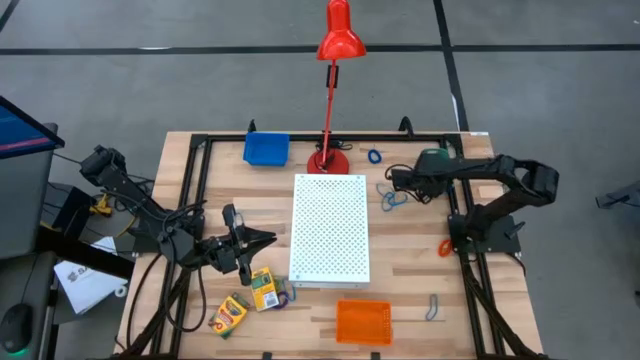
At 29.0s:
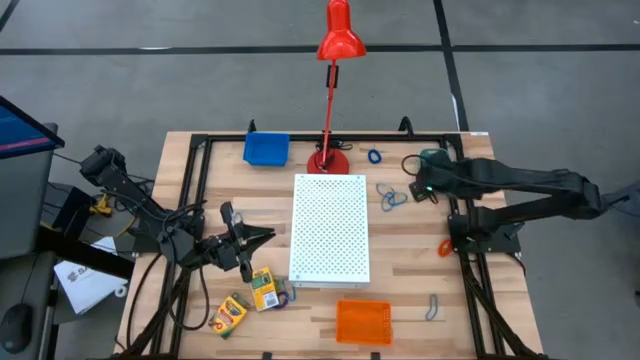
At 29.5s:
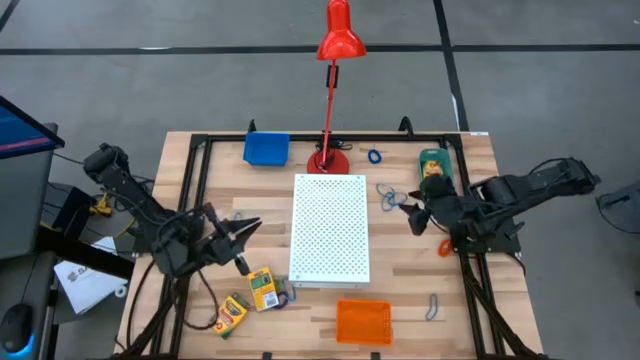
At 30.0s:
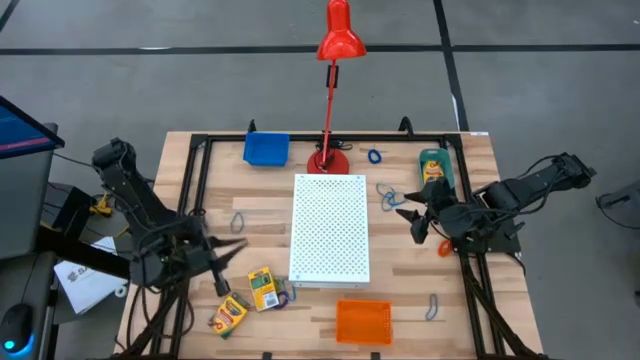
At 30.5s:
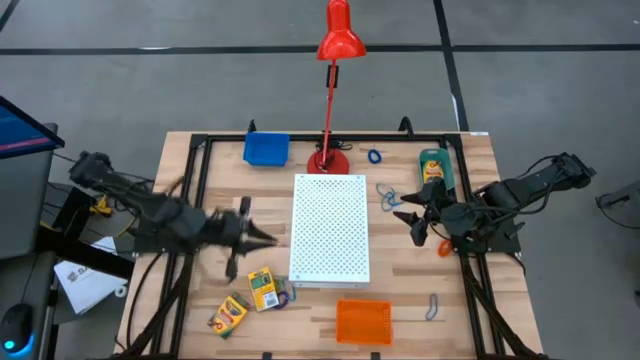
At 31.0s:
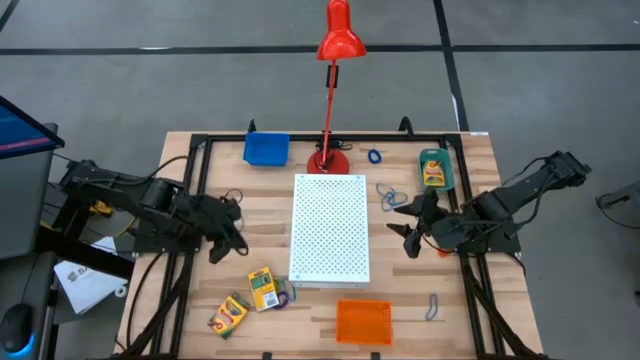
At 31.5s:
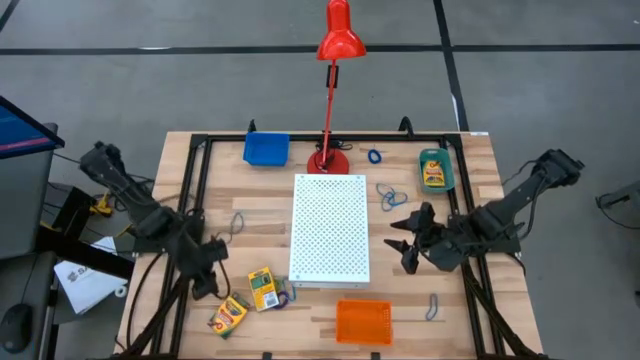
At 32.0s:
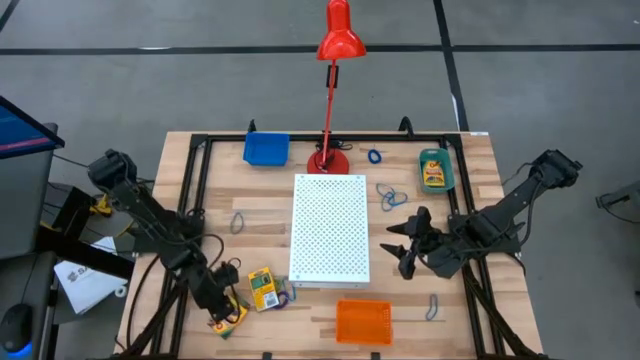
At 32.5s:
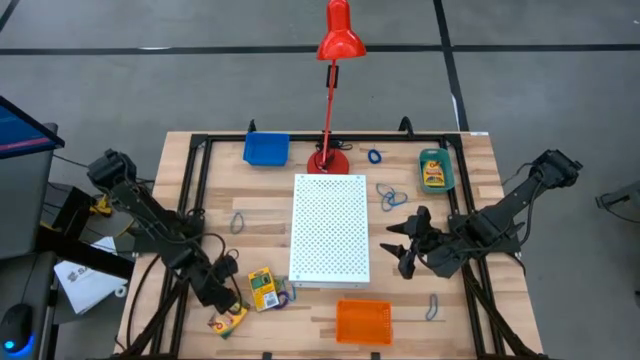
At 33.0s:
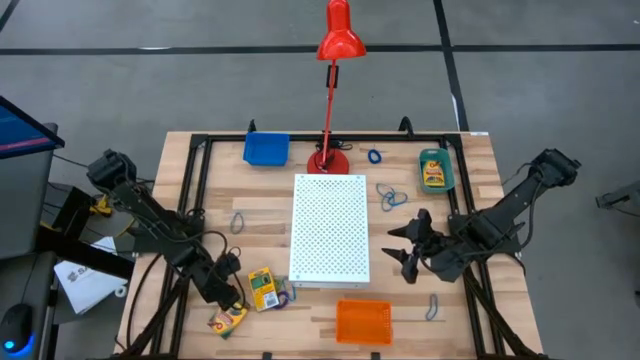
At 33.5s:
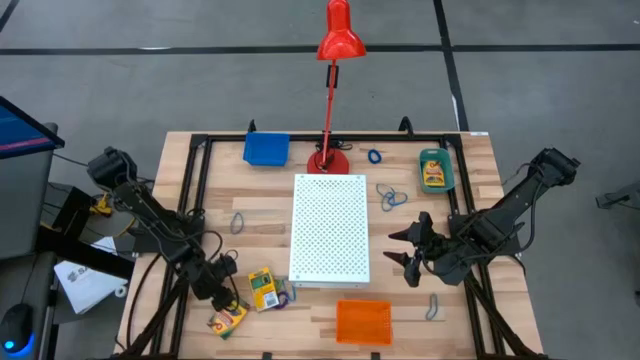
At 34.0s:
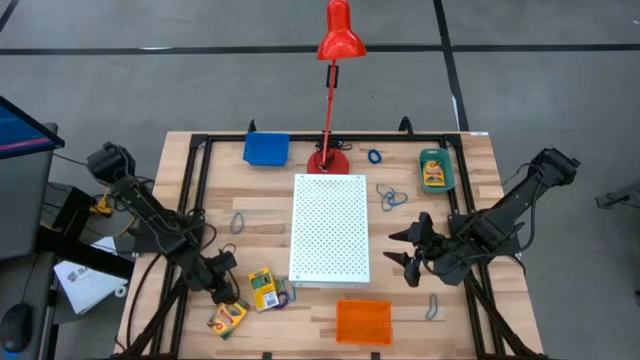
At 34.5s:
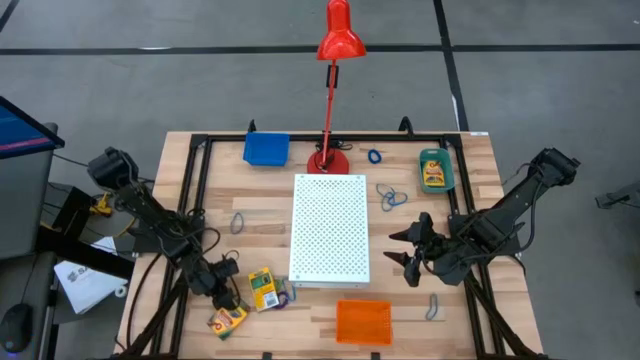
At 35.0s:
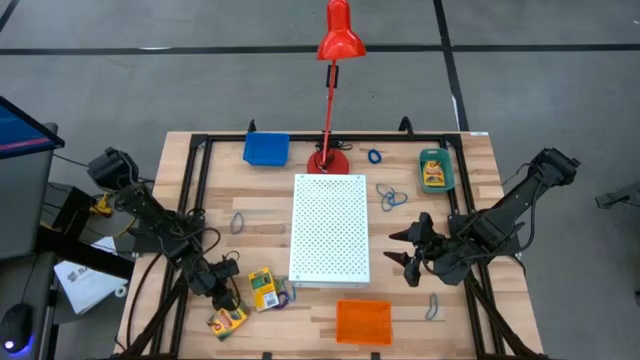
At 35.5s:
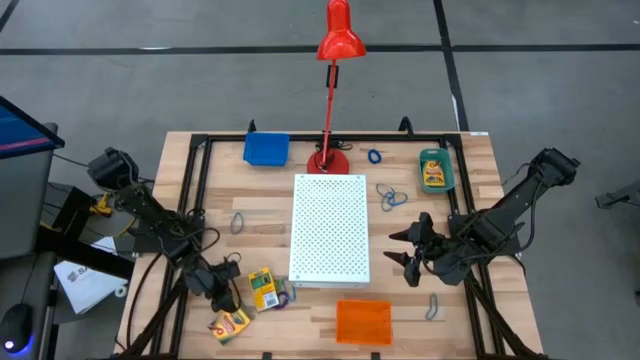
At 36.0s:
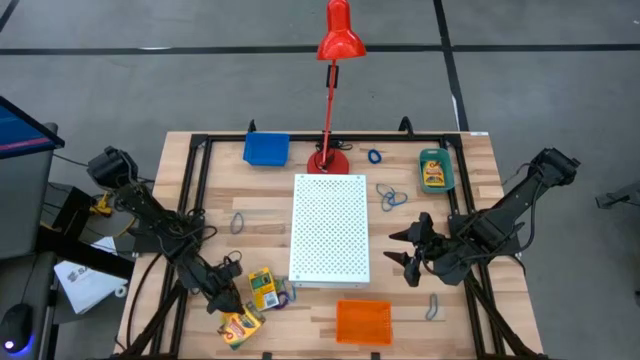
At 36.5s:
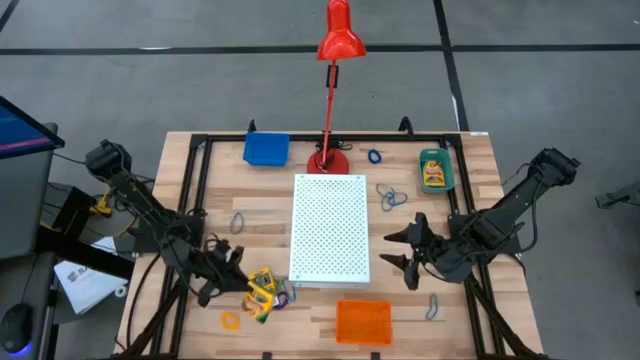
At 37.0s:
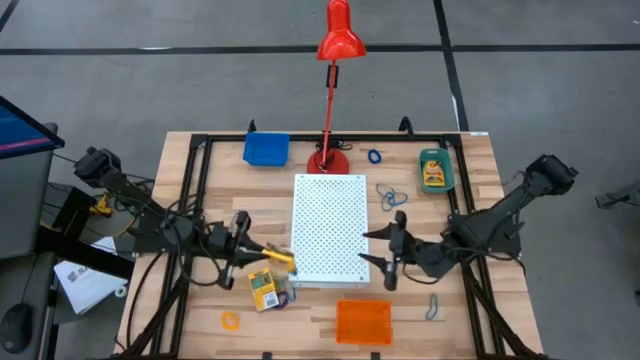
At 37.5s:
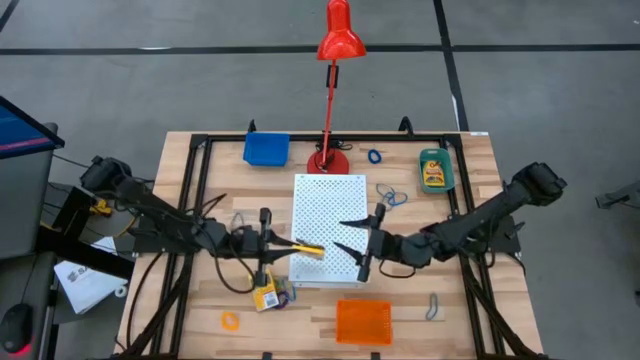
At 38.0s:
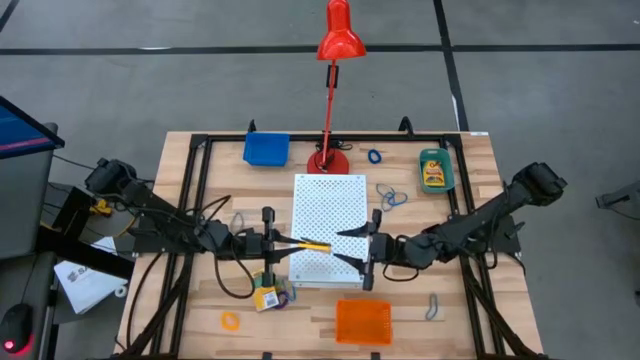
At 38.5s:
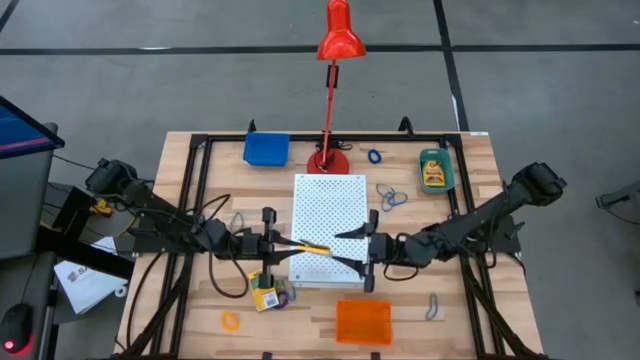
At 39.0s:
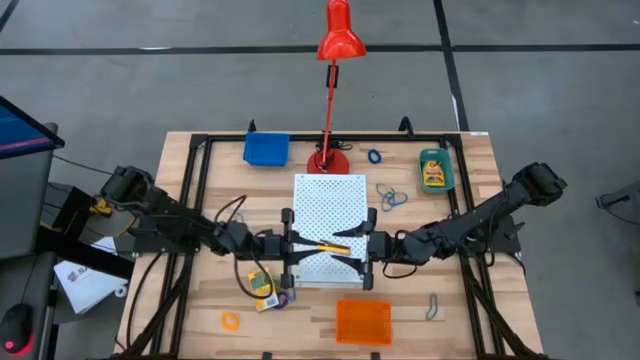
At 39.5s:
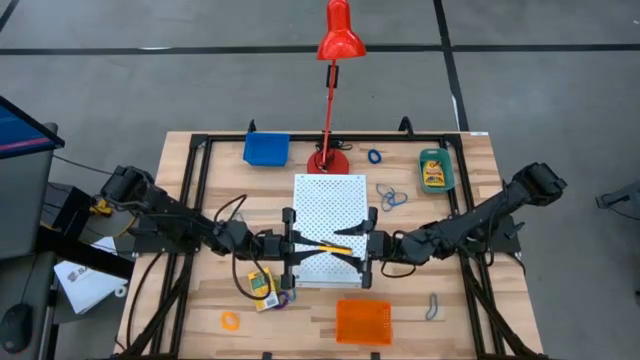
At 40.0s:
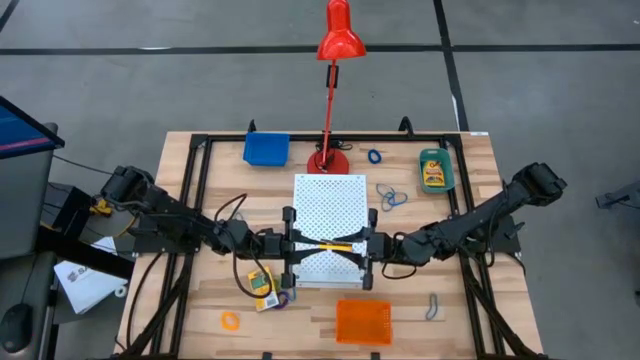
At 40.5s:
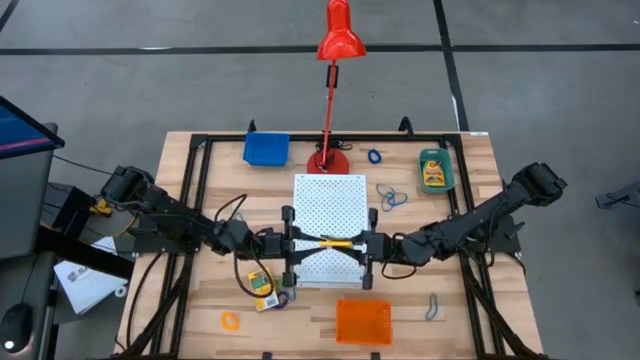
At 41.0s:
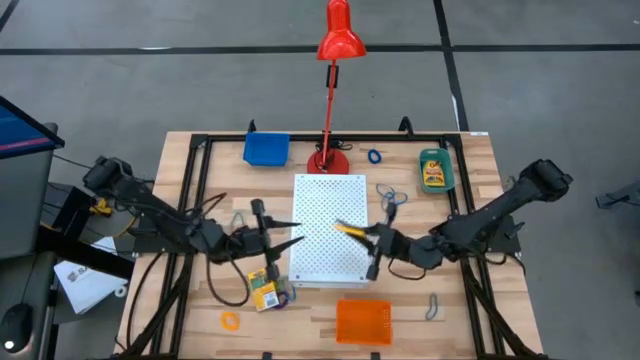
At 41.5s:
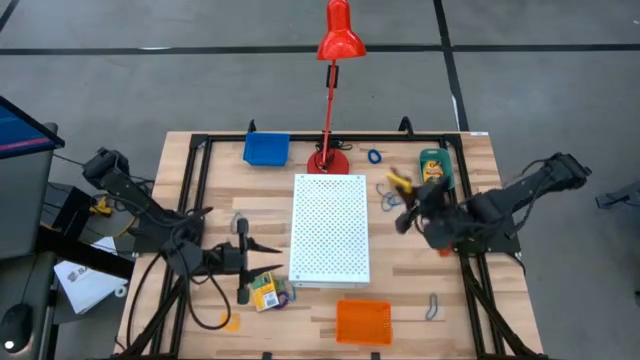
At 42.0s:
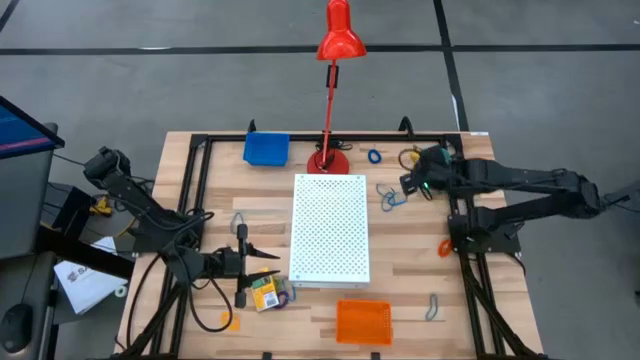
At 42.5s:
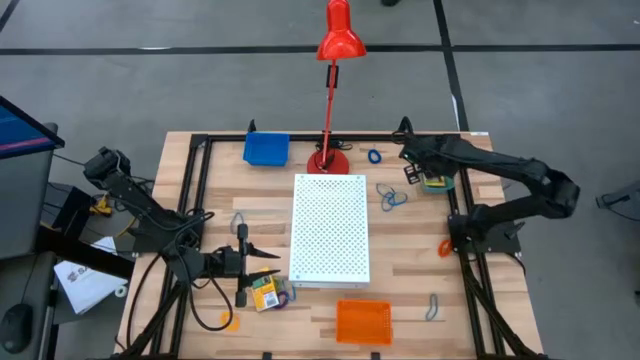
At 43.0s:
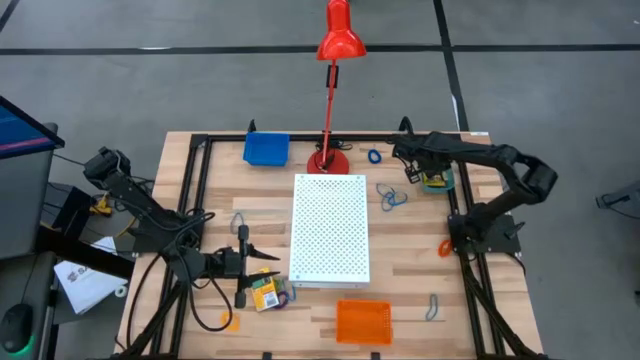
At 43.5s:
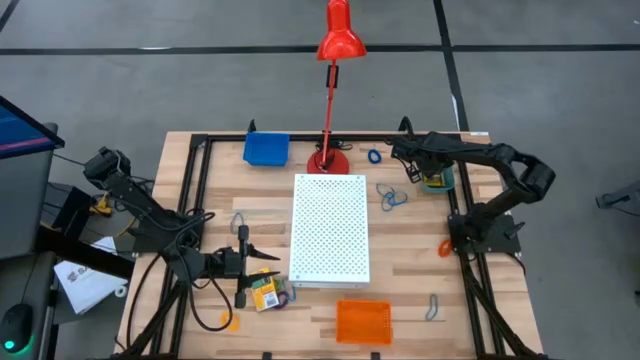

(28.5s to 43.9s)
Task: Pick & Place Office Desk Supplies
Put the yellow crayon box into the green bin

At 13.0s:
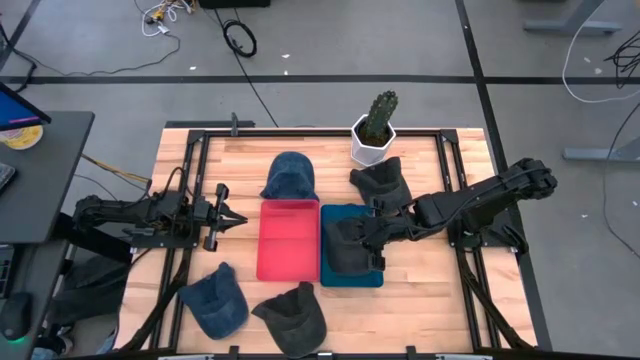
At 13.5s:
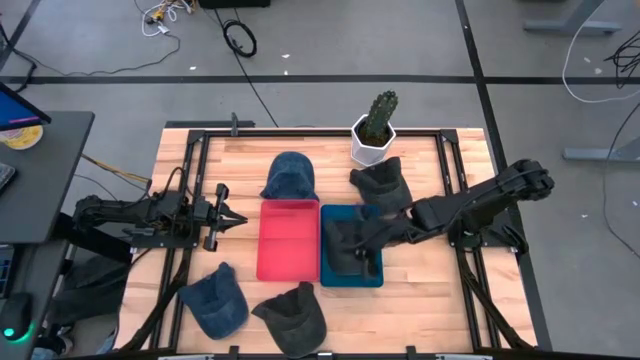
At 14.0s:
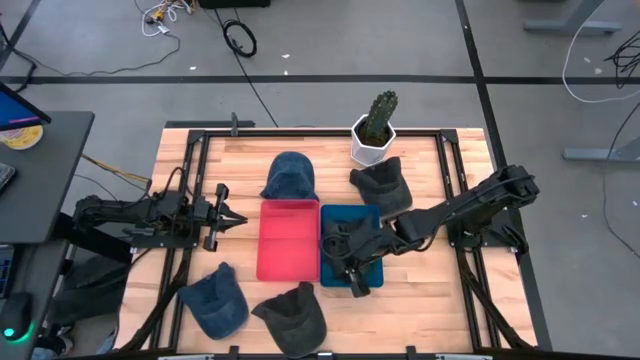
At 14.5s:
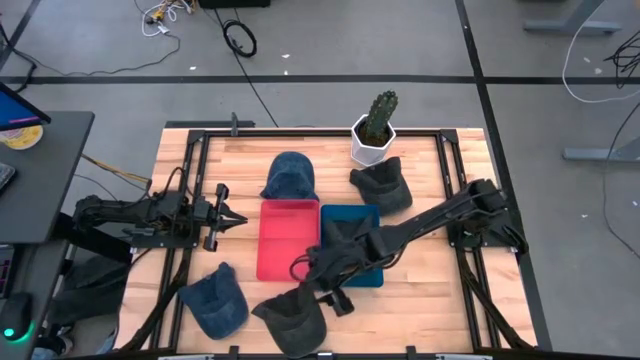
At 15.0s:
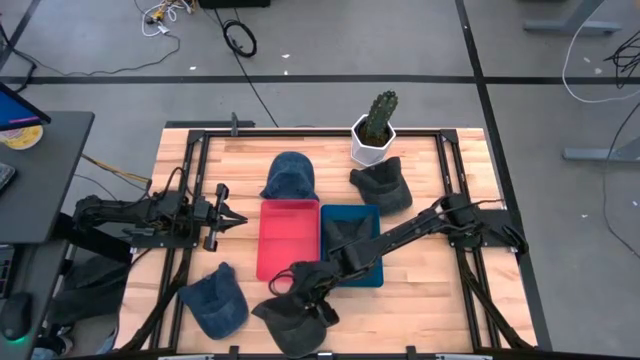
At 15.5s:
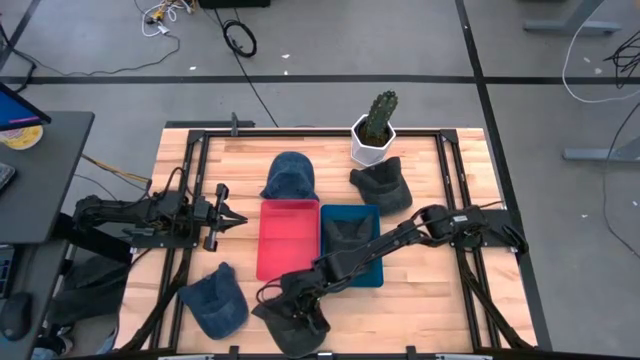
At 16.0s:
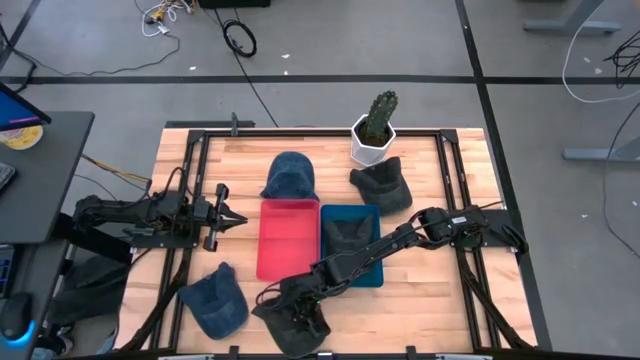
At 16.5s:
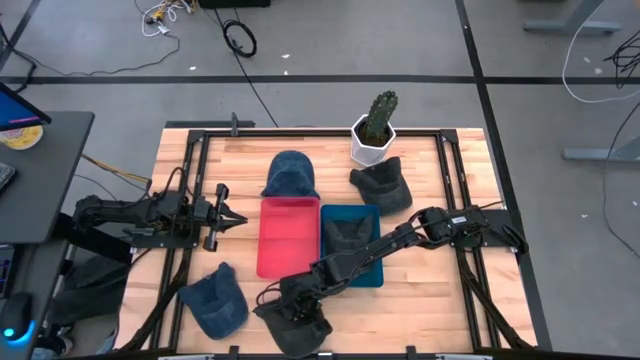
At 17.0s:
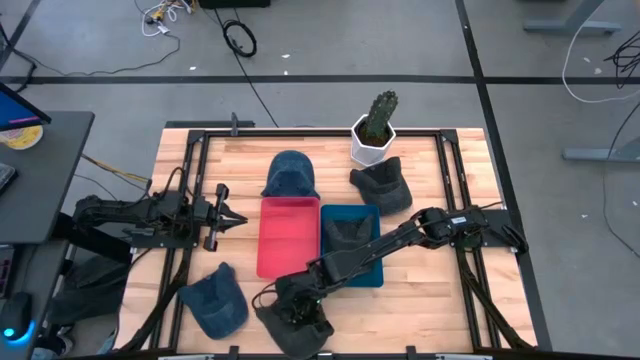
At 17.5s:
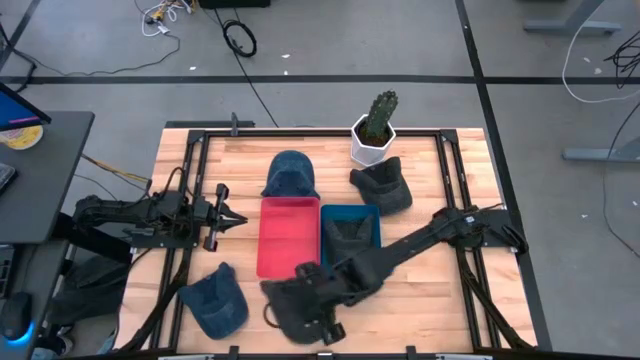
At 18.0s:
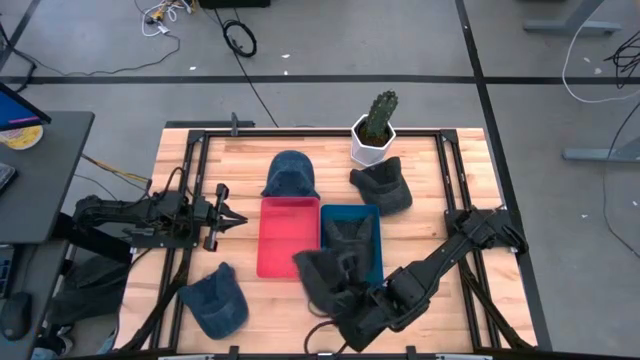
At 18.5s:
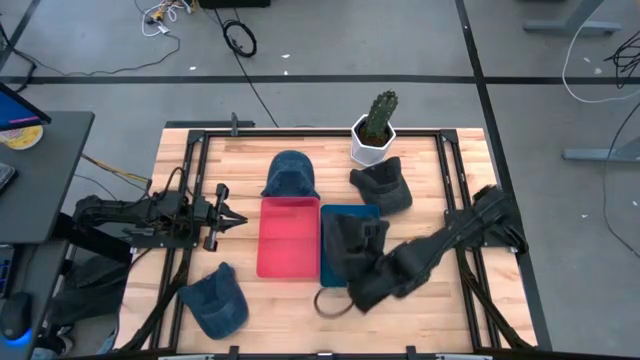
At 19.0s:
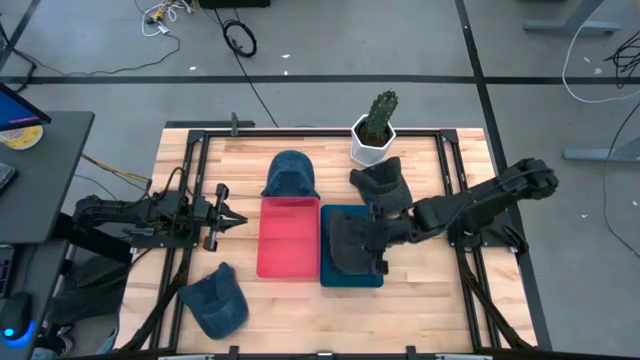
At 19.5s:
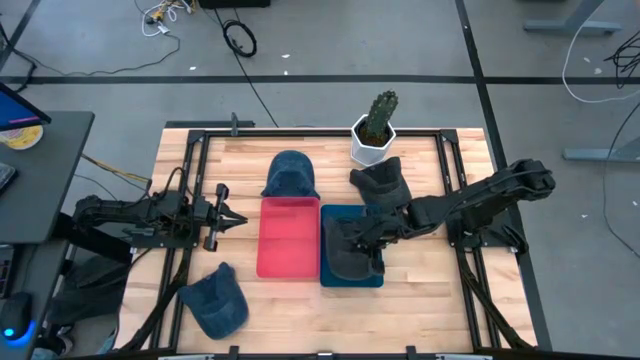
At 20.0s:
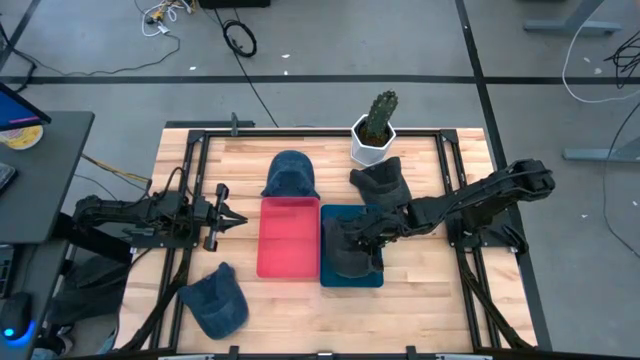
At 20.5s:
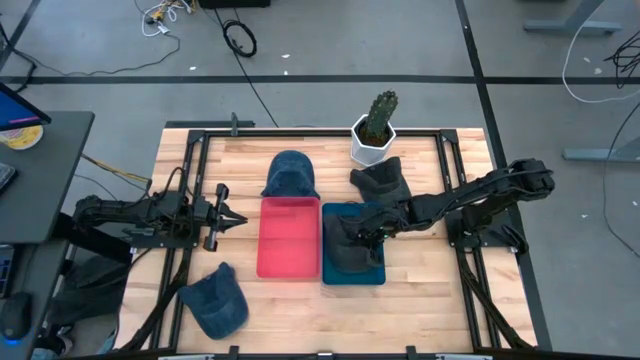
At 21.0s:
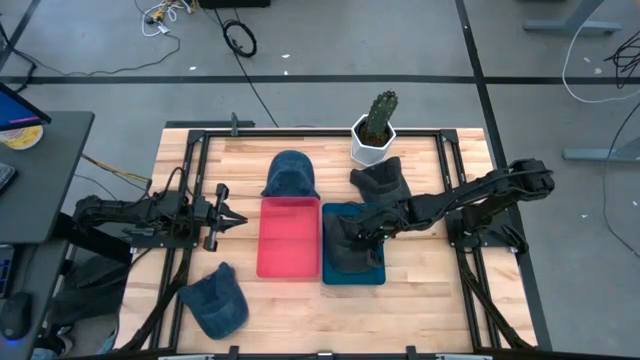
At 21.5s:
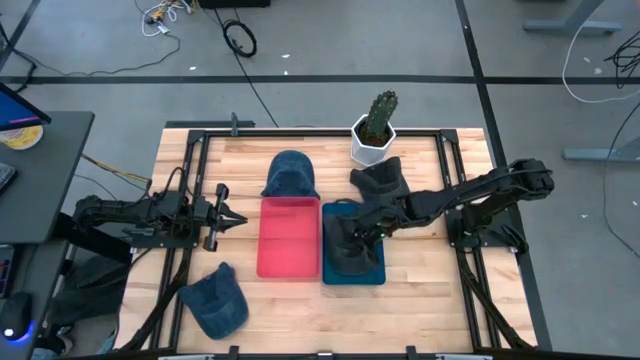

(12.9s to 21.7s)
Task: Pick & Place hat
Put the bottom gray cap into the blue bin
